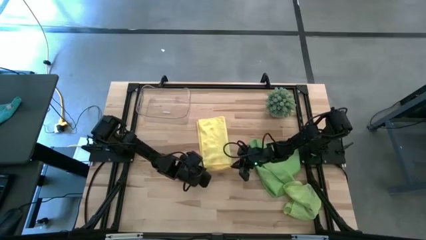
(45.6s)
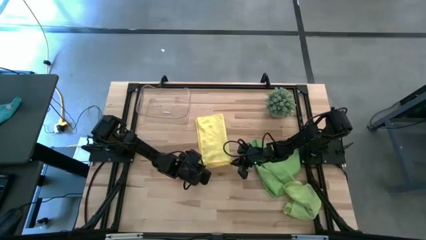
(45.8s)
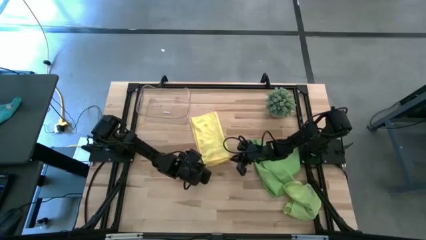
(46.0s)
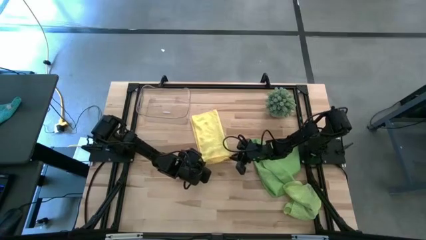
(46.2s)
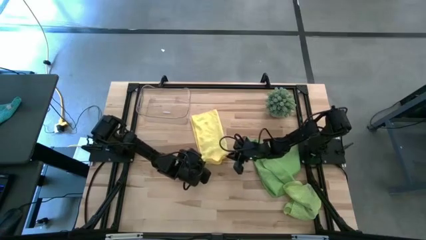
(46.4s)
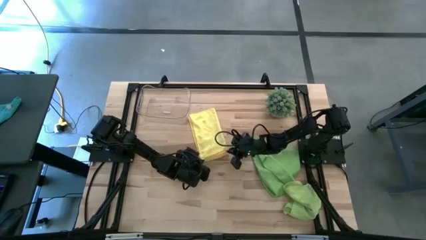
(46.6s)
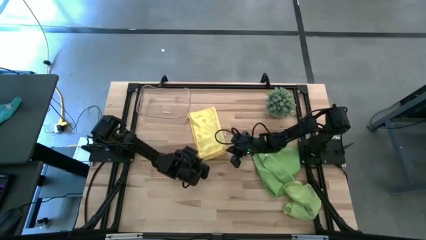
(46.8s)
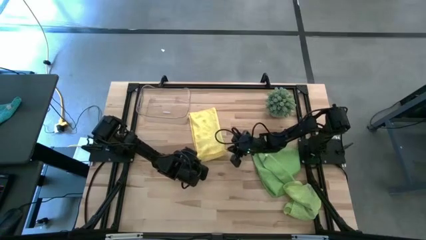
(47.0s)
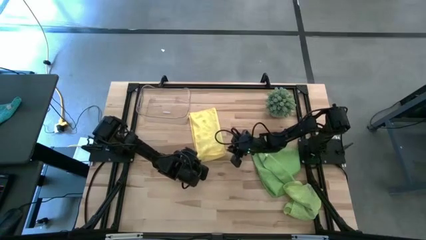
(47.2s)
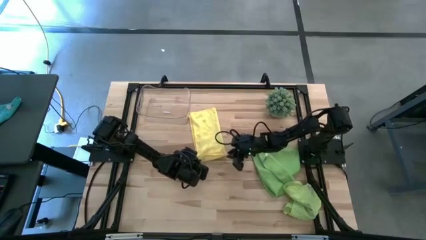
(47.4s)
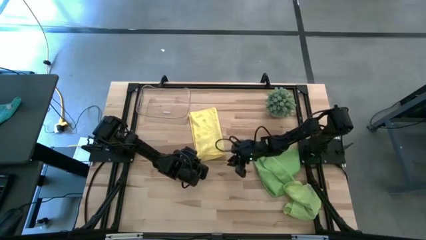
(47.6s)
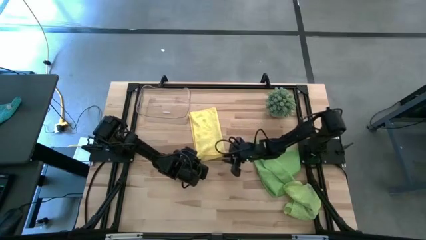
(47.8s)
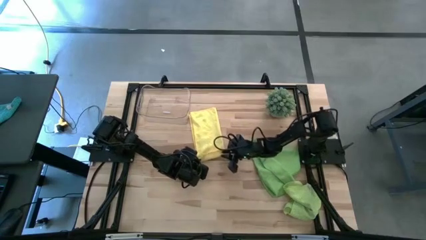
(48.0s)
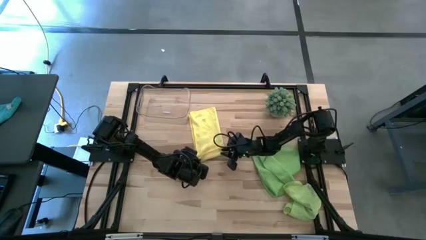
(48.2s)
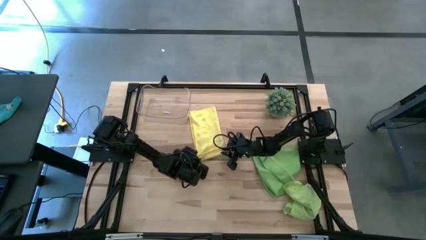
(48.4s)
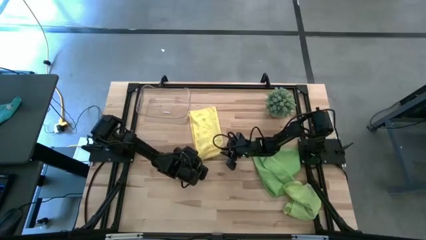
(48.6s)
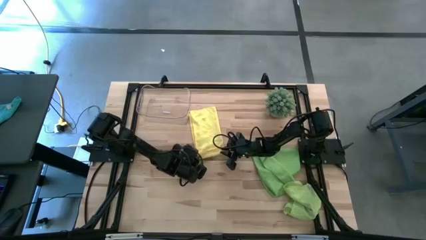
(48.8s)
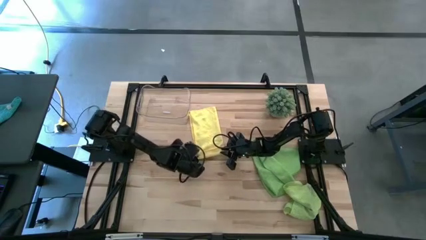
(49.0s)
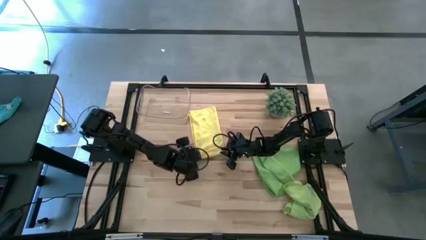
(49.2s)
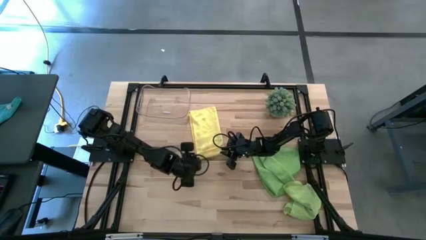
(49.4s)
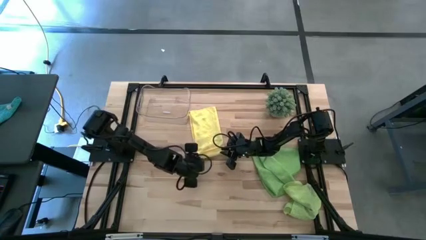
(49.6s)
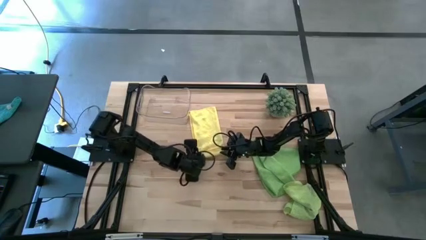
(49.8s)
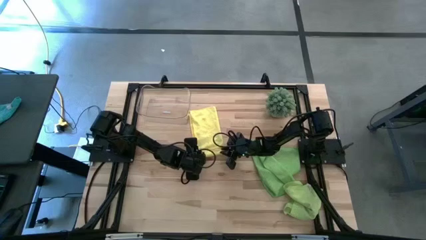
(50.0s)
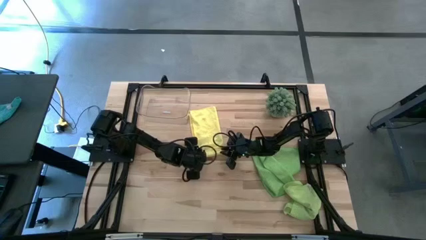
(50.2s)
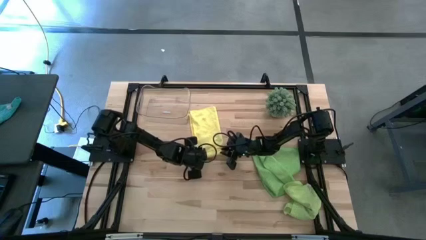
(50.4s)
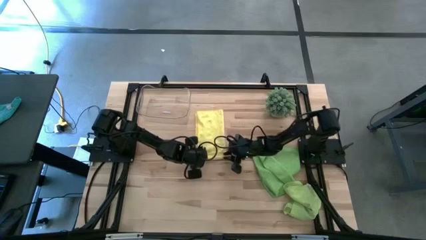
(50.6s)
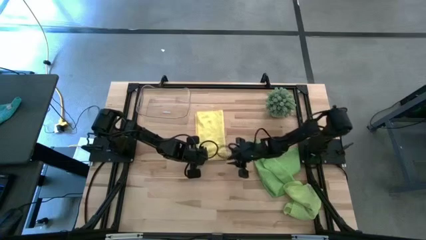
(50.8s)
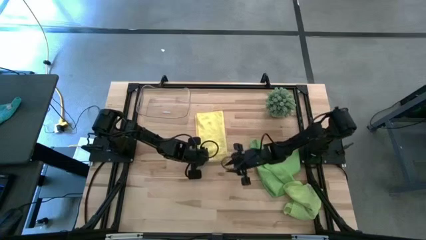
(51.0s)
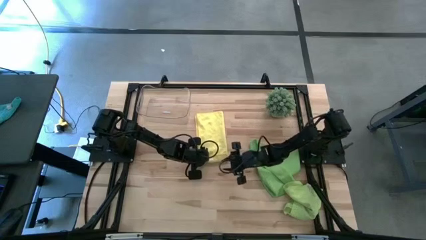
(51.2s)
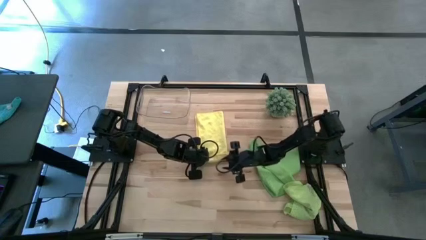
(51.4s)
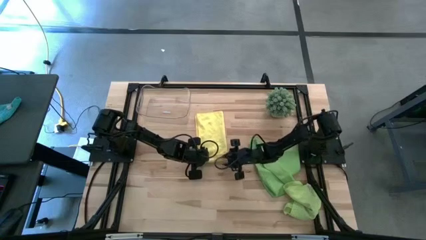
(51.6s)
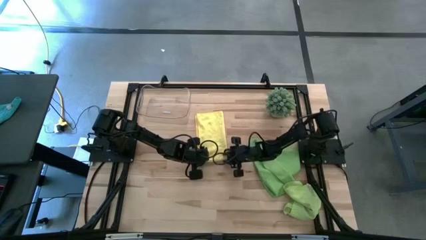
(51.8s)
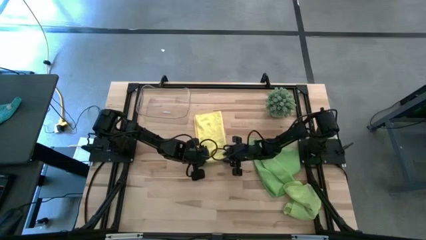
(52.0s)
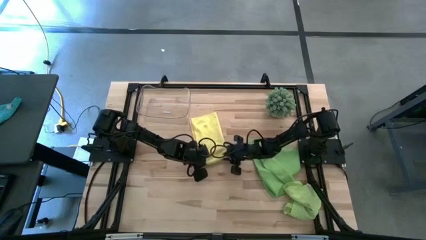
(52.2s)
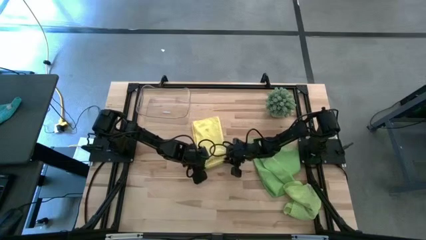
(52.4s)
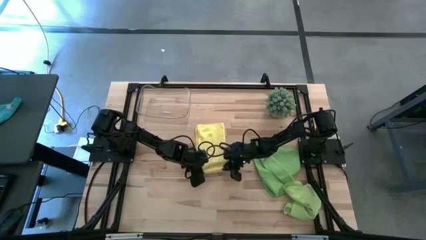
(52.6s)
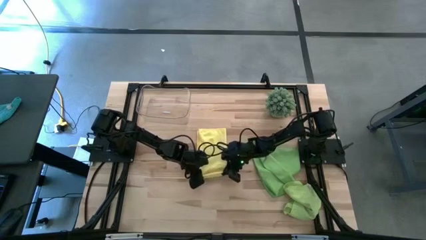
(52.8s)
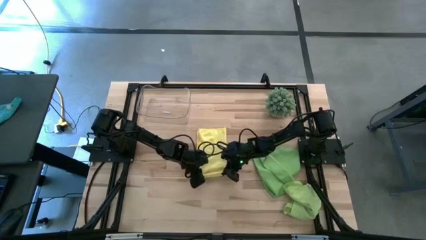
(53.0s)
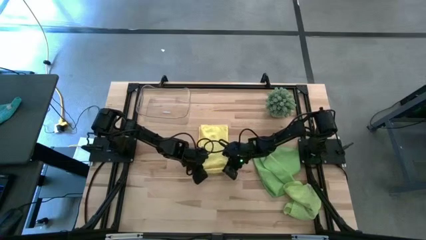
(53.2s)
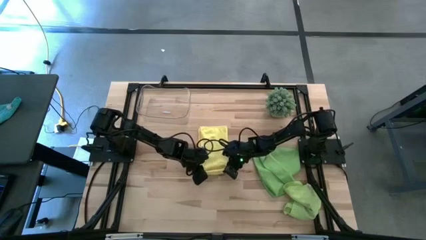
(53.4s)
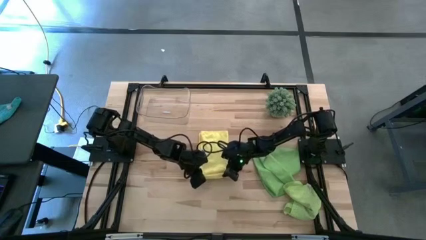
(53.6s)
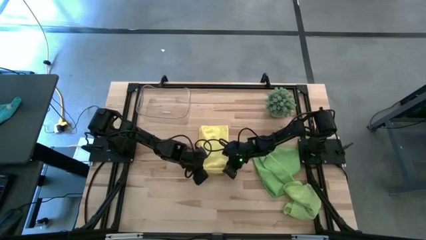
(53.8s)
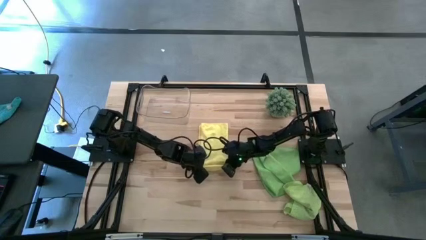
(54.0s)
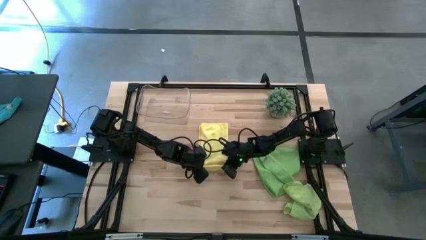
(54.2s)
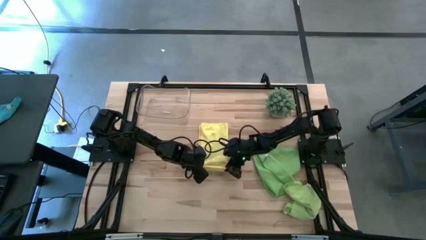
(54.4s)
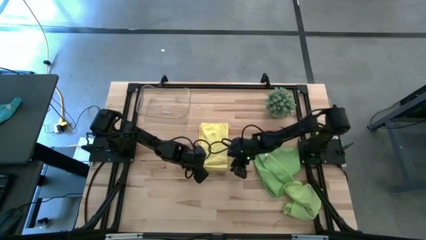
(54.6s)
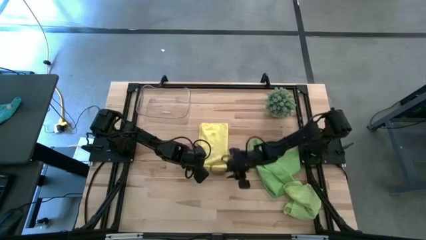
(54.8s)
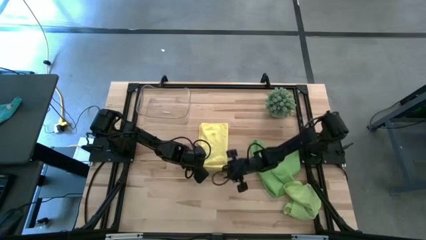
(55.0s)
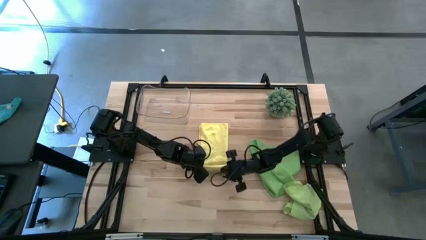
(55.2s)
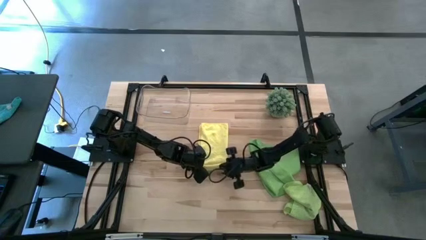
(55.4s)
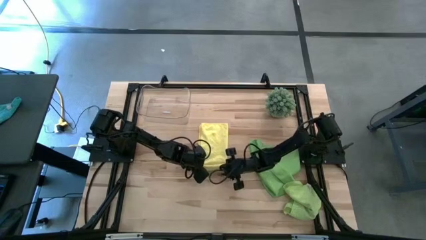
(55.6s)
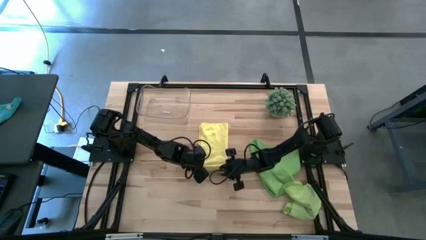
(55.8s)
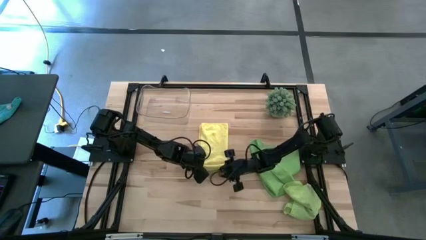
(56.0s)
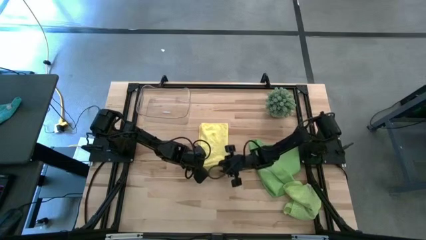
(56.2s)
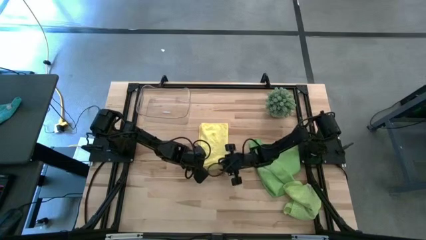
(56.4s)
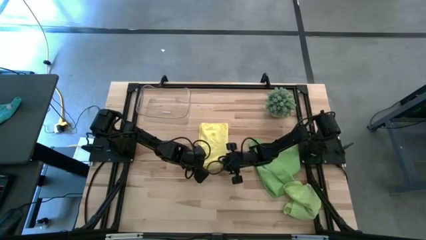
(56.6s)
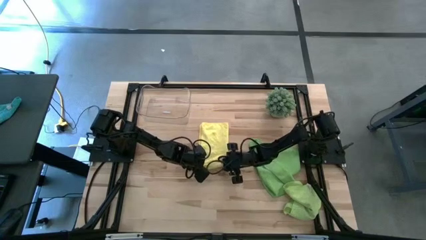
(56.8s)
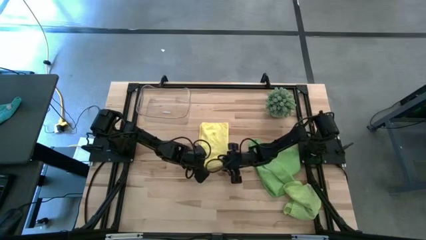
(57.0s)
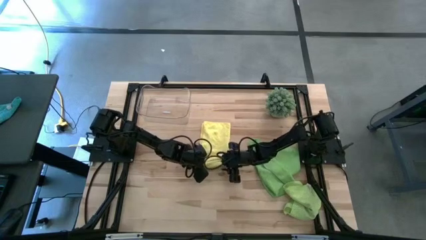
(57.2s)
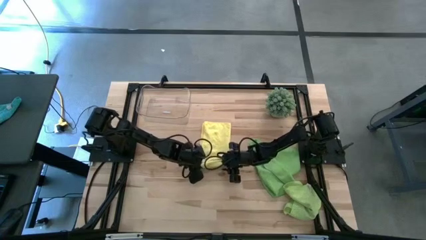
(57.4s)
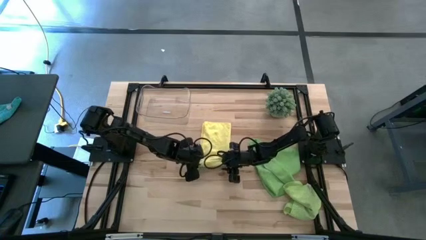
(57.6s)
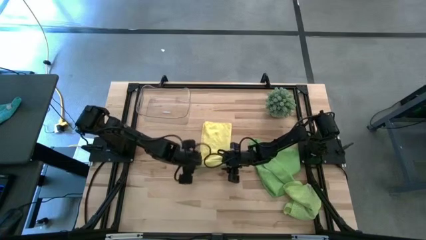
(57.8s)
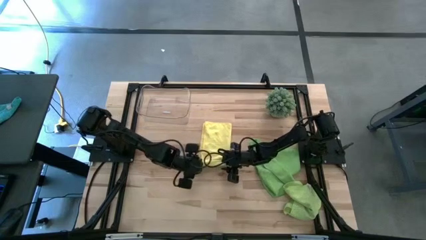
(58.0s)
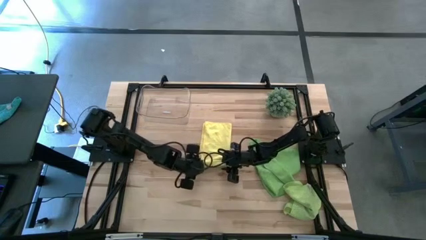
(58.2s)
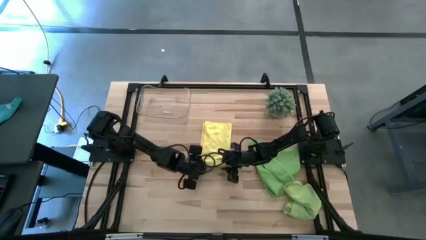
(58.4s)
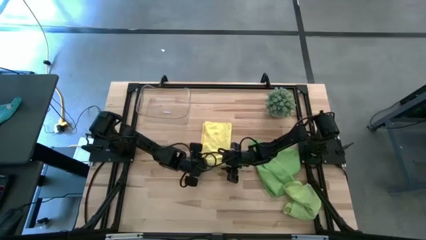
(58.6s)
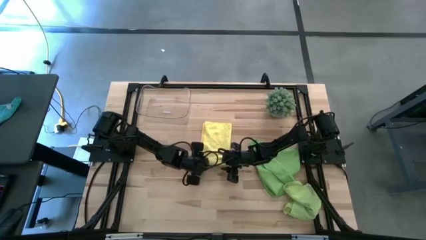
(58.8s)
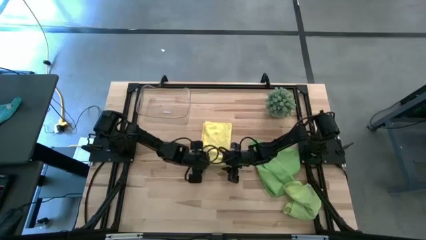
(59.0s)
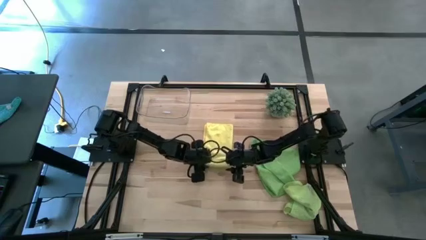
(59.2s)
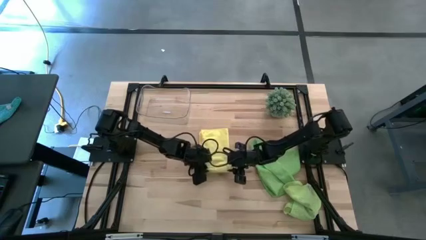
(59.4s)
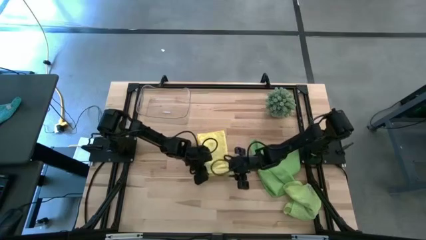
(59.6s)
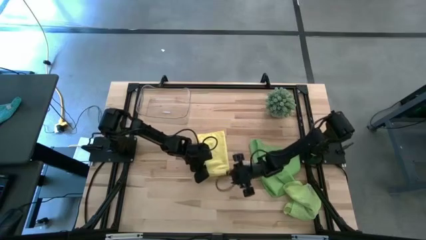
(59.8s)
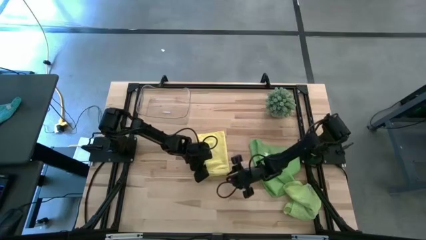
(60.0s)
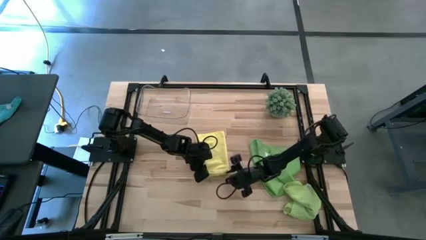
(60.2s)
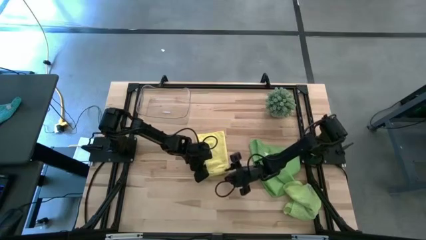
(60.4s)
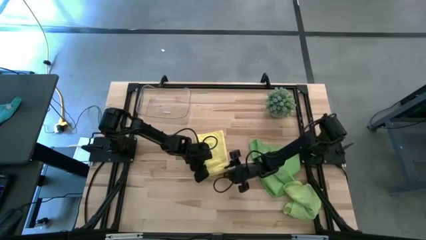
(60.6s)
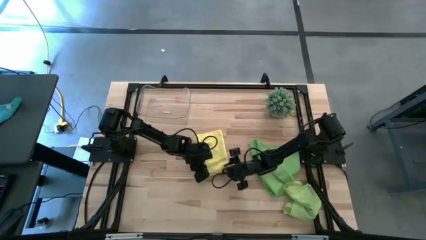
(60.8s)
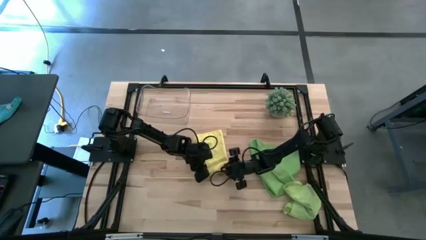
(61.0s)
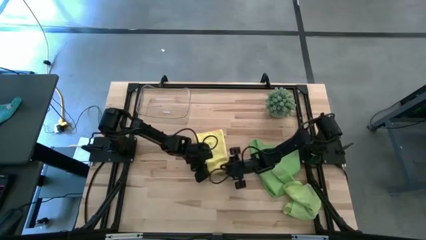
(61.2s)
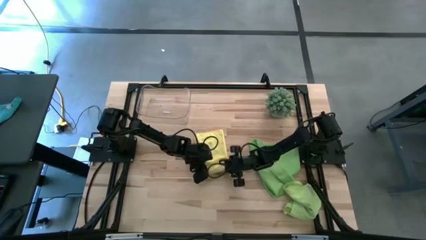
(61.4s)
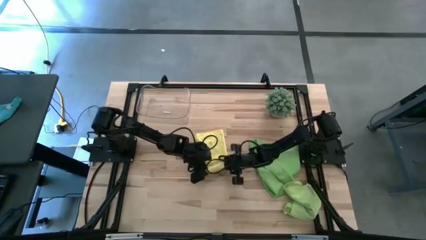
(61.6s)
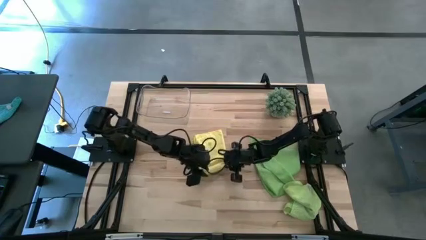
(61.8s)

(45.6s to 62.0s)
Task: Roll microfiber towels into tight, uniform cylinder then place into a basket
Roll the yellow microfiber cloth

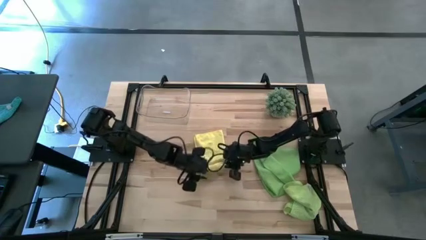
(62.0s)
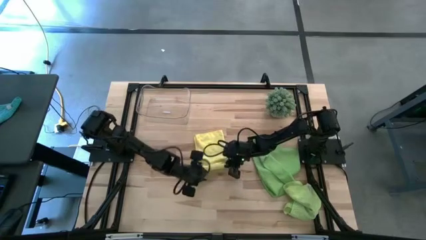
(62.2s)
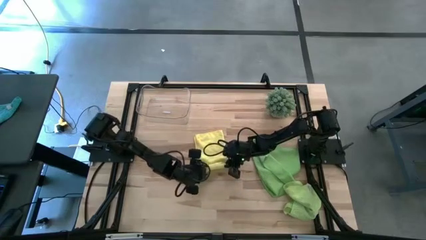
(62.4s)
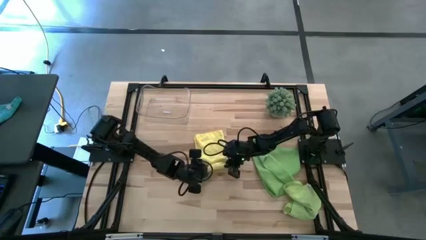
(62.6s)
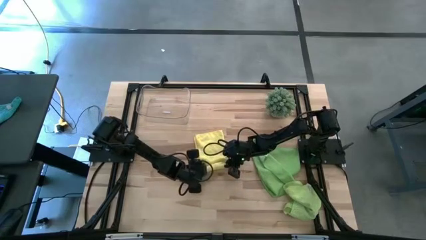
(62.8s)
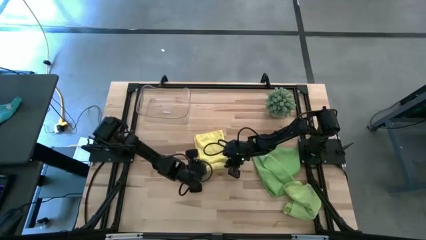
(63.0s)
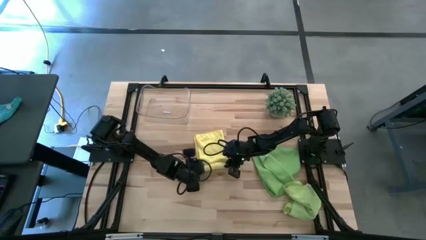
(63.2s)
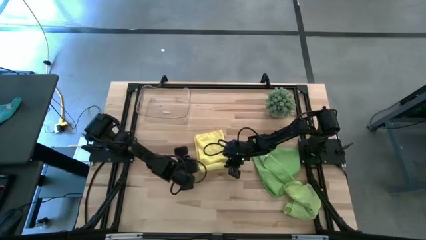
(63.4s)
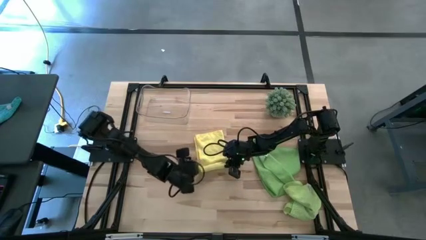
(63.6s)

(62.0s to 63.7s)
Roll the yellow microfiber cloth
